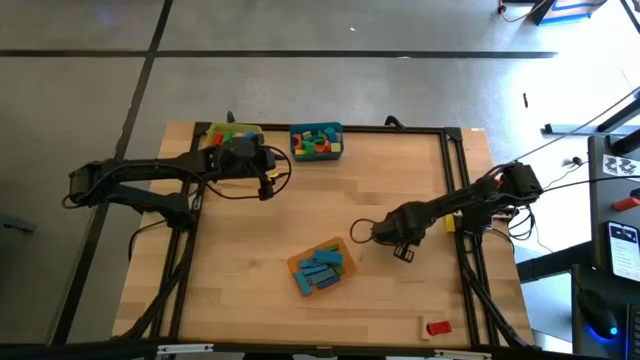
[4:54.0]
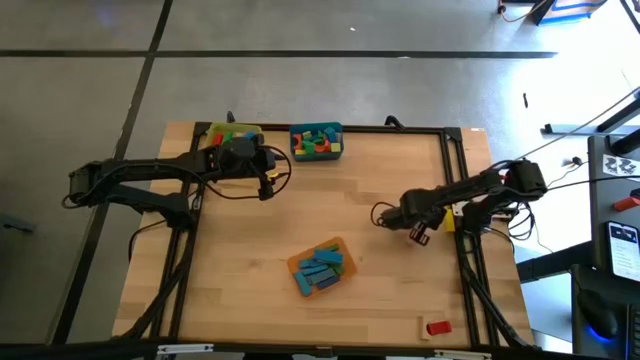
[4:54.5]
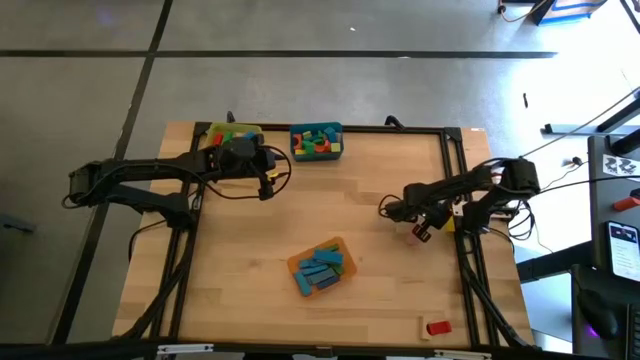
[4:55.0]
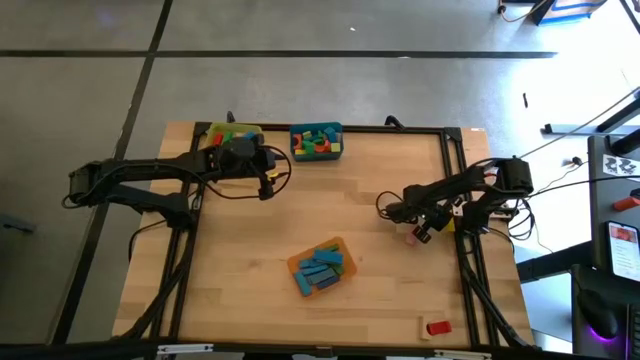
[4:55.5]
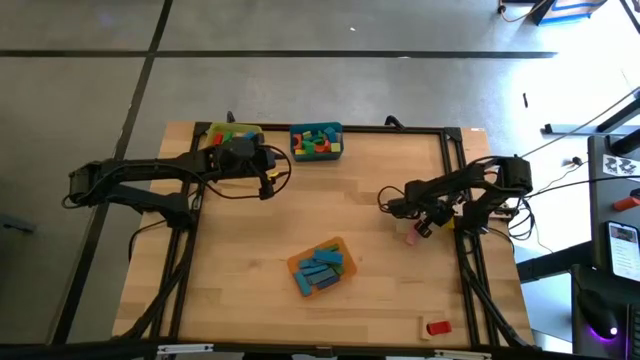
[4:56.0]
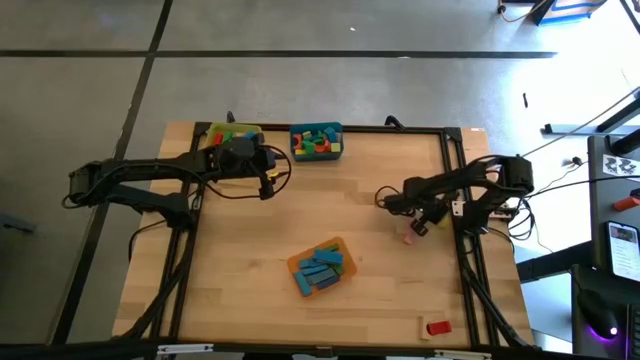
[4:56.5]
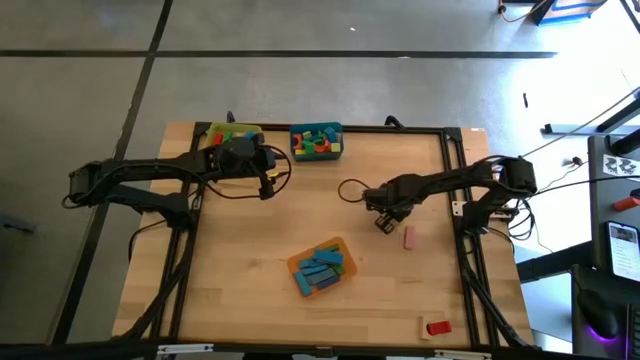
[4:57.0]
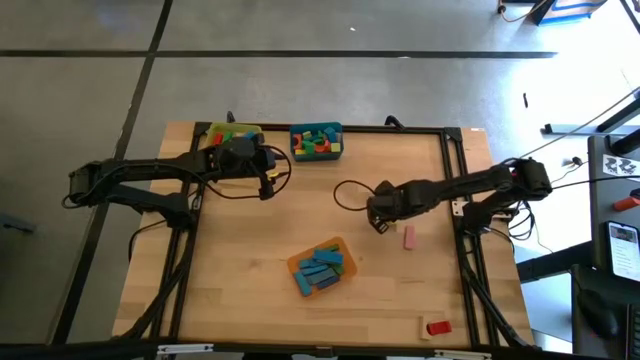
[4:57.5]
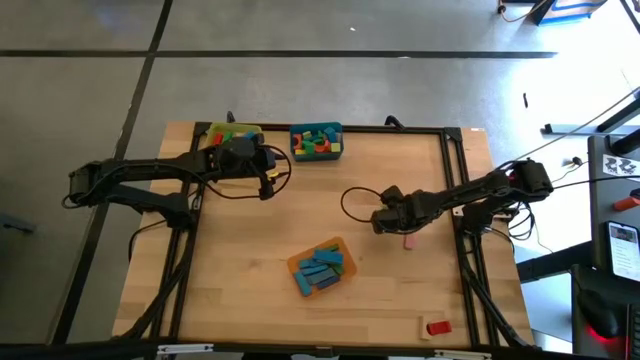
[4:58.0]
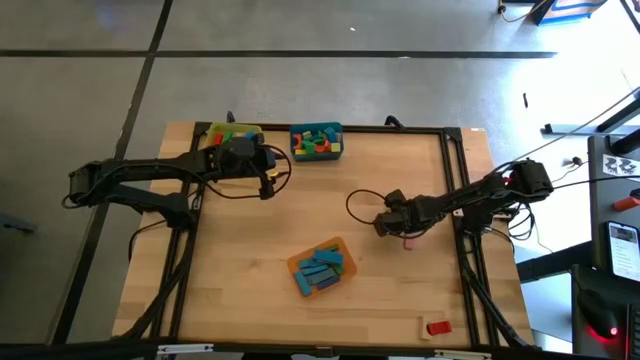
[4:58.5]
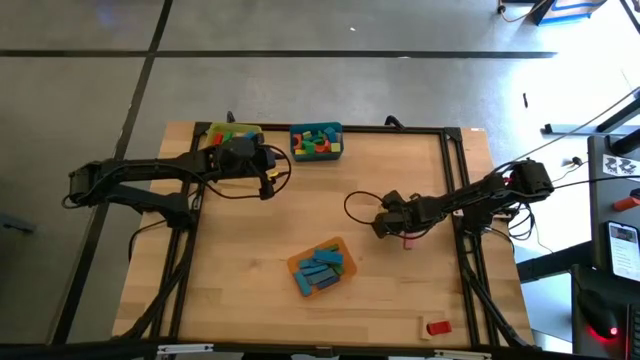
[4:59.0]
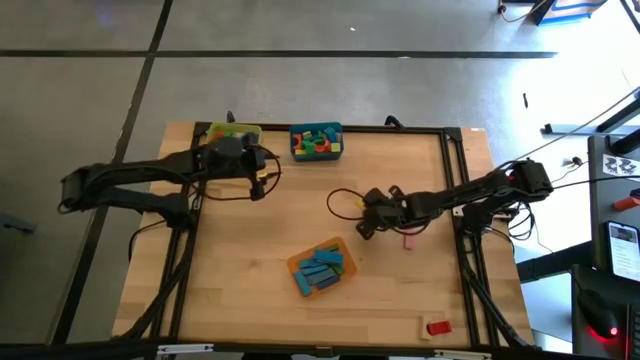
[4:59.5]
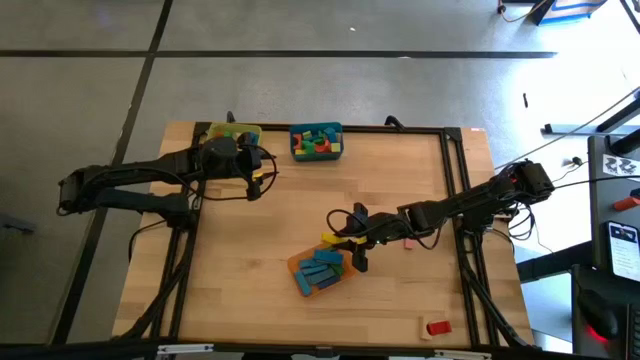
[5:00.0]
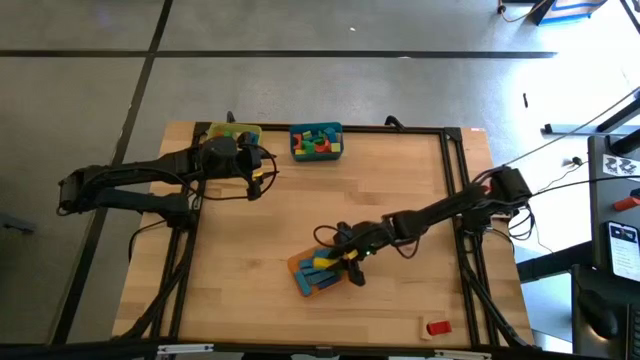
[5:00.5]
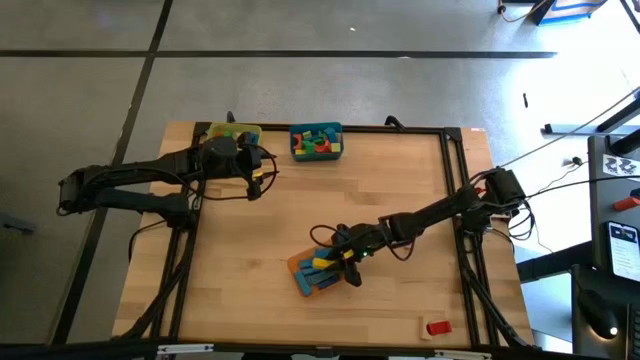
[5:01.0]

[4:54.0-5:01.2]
Task: Sort blocks by size
Put the yellow rectangular block into the orange bin

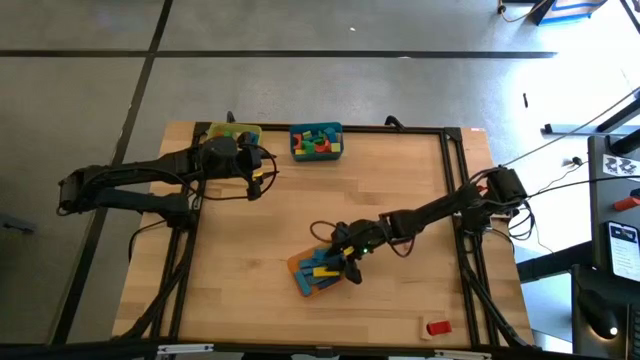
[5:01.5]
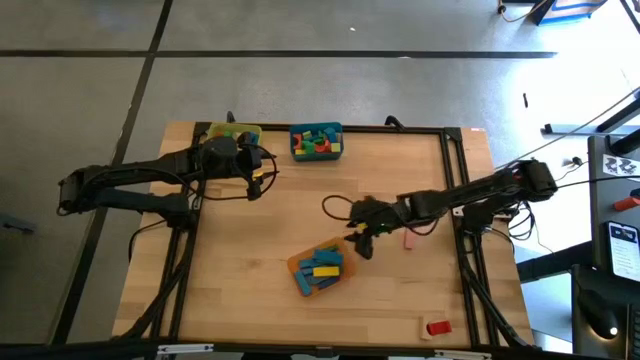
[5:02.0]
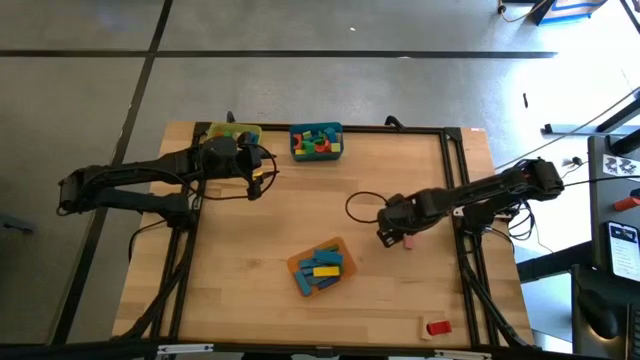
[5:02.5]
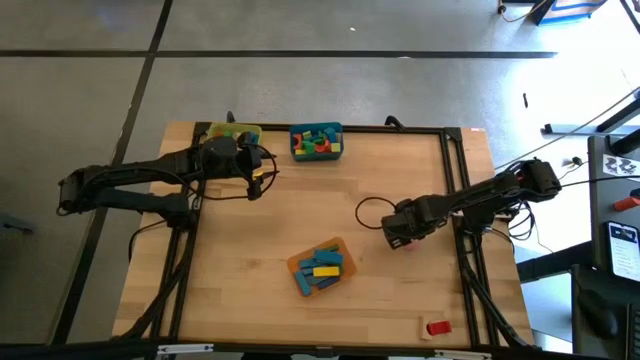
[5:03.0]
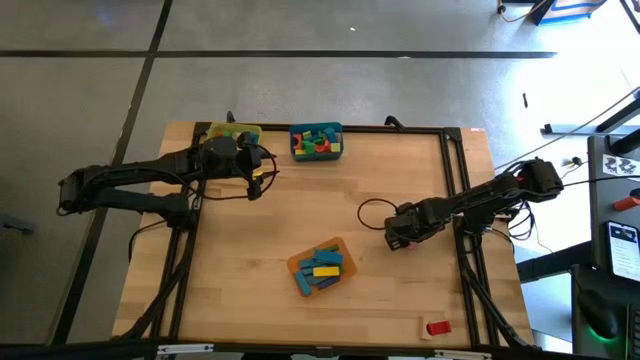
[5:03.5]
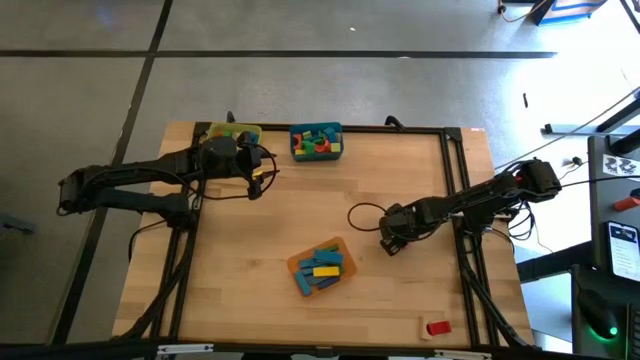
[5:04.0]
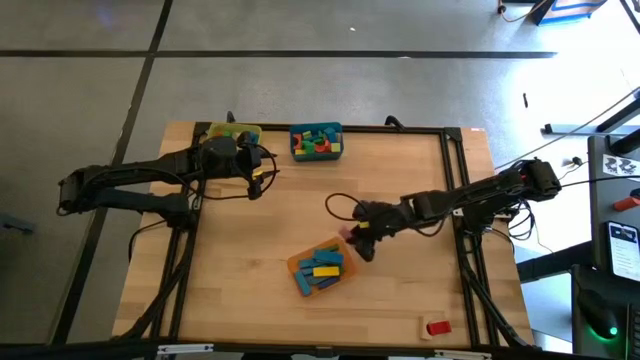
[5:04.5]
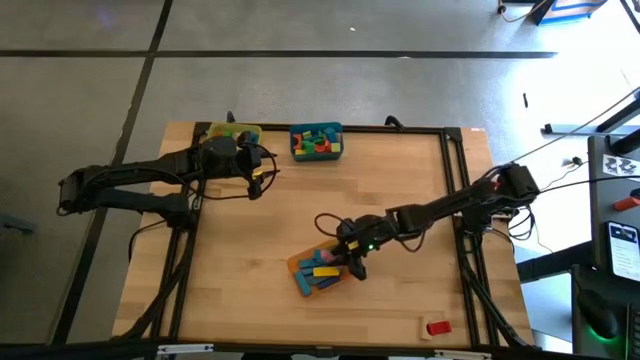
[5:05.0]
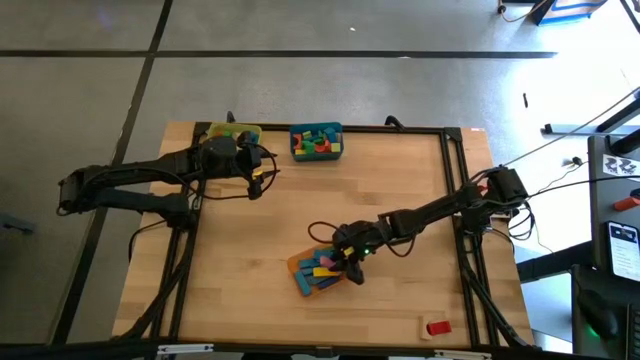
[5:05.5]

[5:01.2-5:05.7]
Put the pink rectangular block into the orange bin

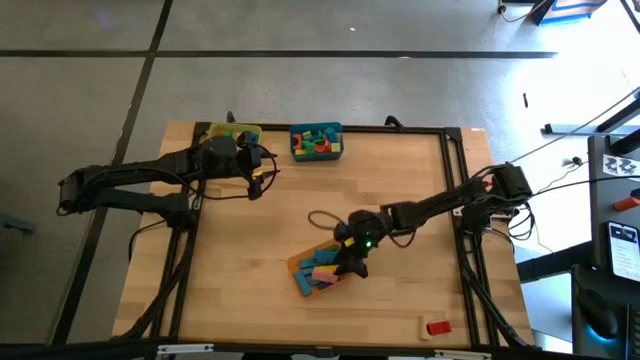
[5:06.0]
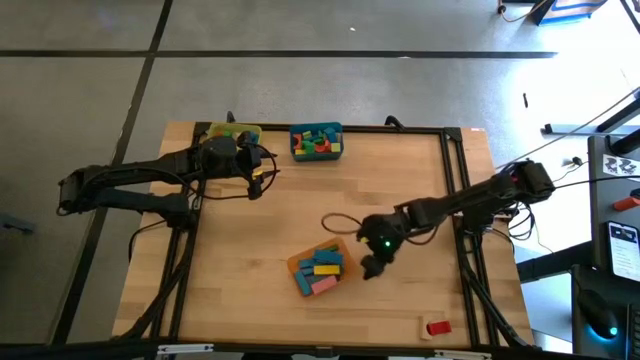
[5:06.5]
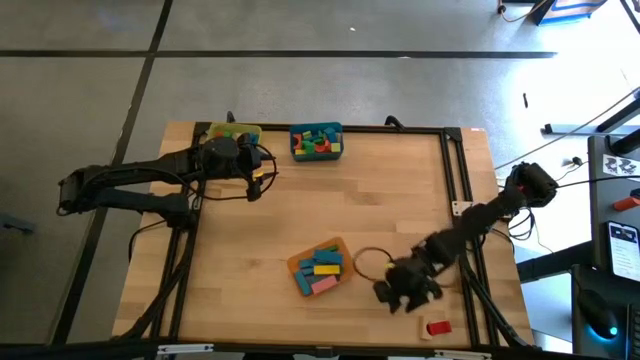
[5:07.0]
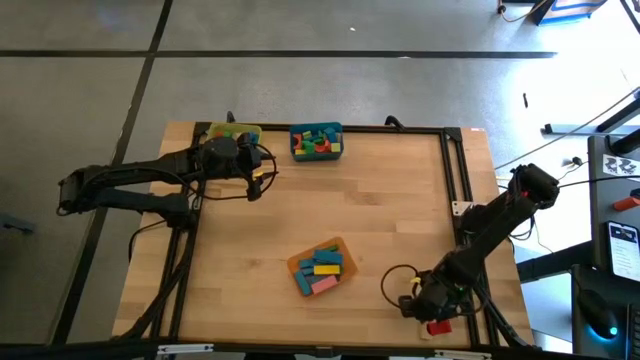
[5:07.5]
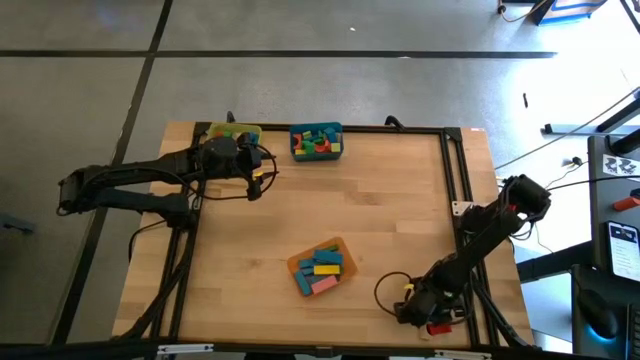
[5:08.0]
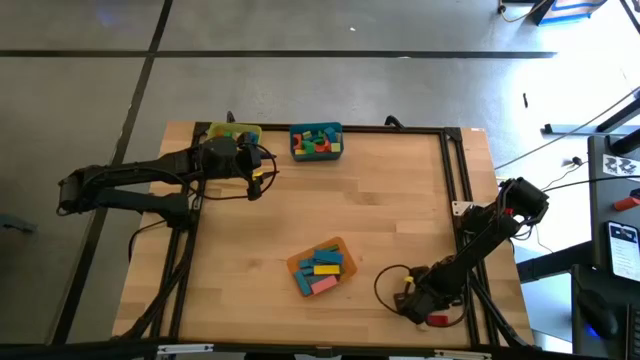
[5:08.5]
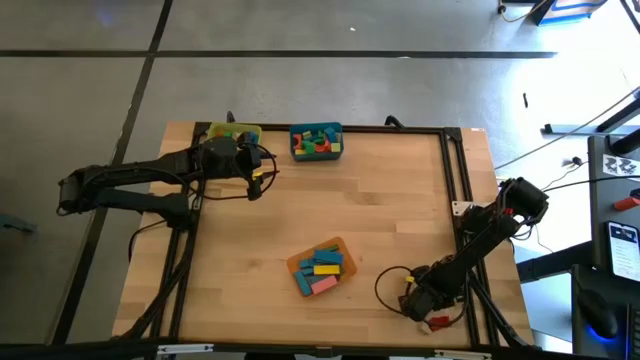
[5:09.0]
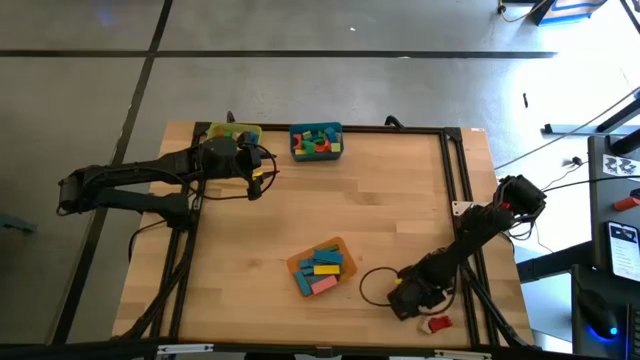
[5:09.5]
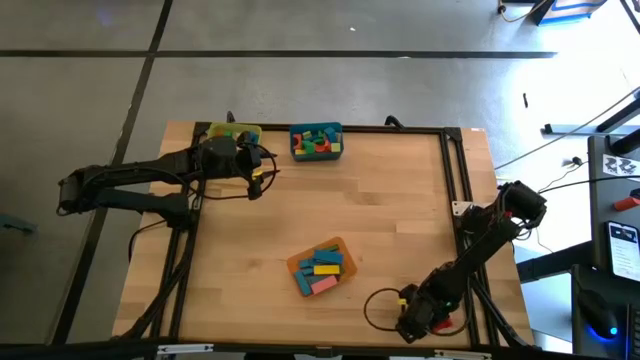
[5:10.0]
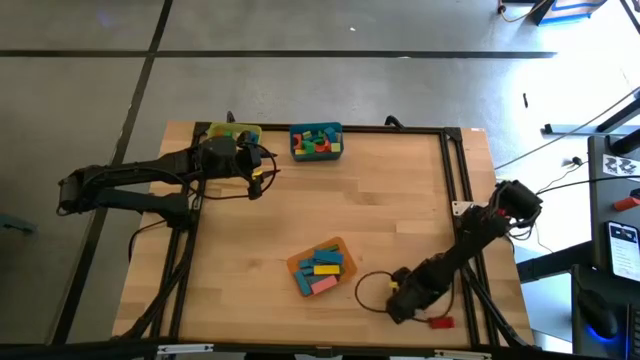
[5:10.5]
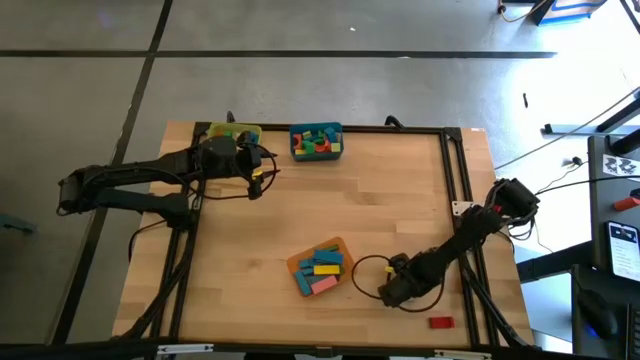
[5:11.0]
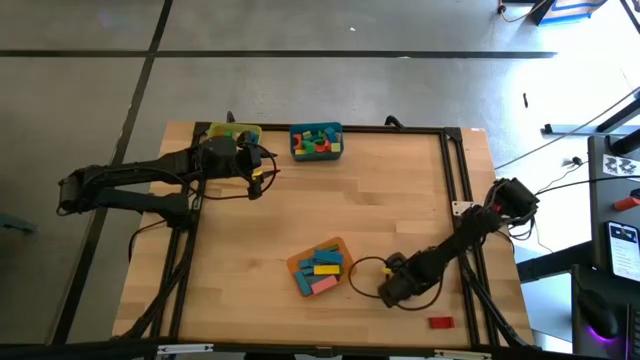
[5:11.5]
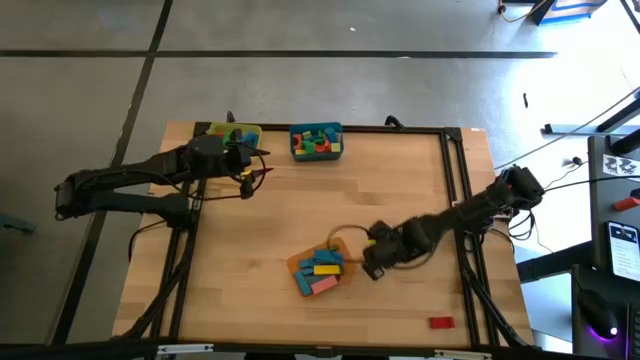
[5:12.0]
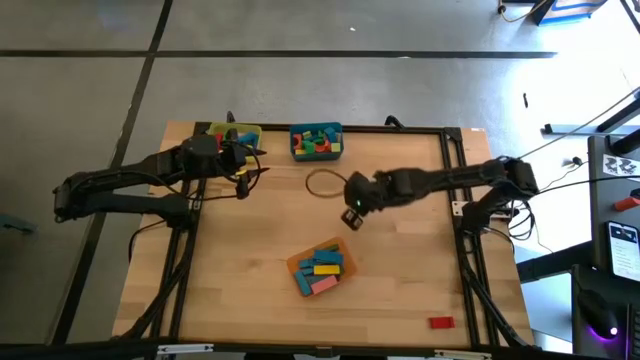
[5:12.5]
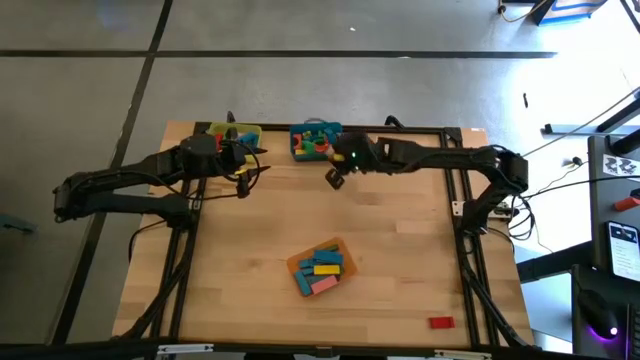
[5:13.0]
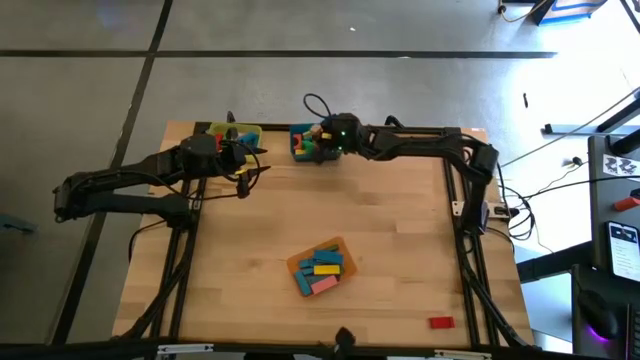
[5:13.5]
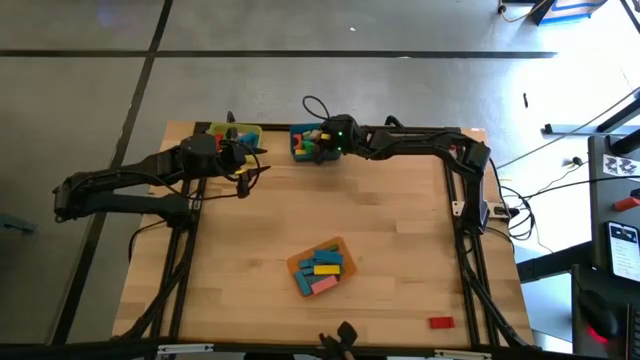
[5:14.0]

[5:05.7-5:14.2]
Put the brown arch block into the blue bin
